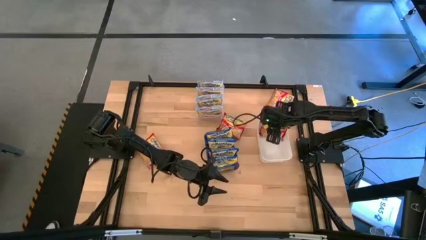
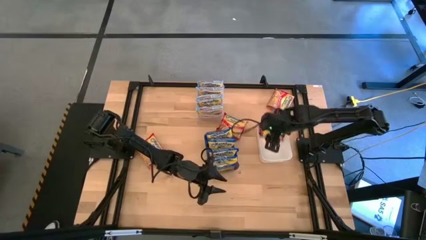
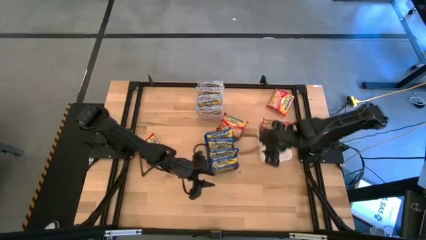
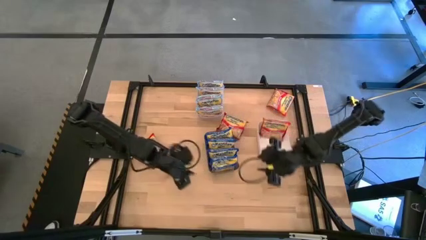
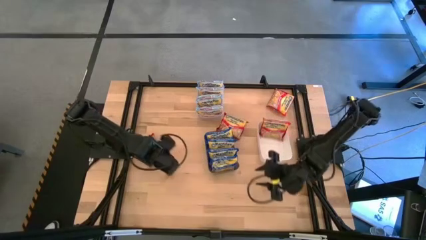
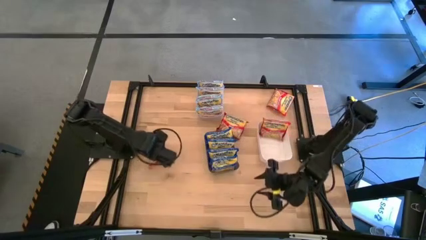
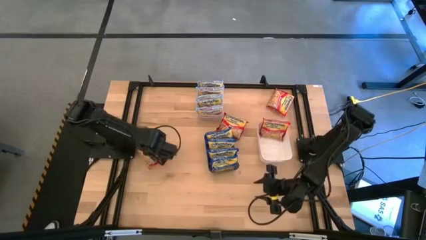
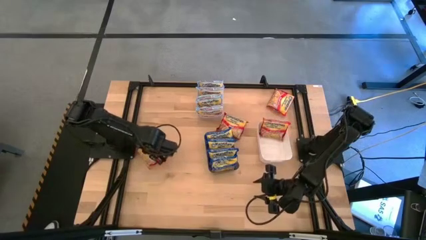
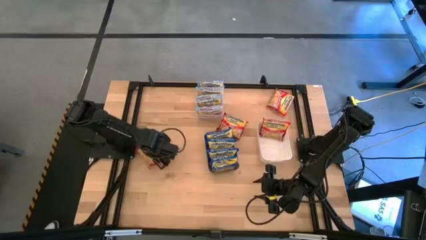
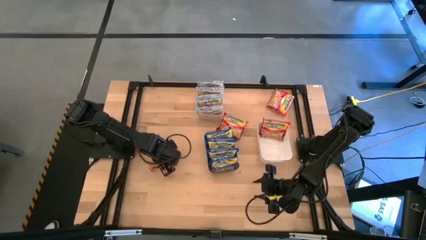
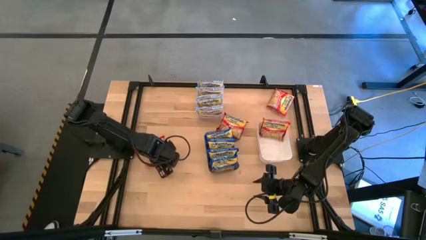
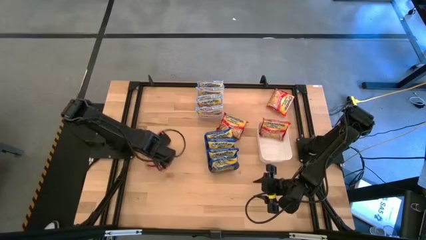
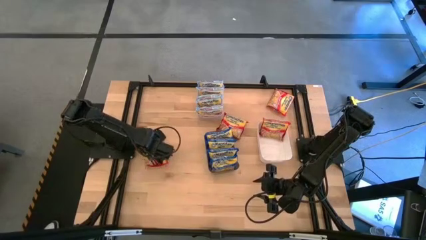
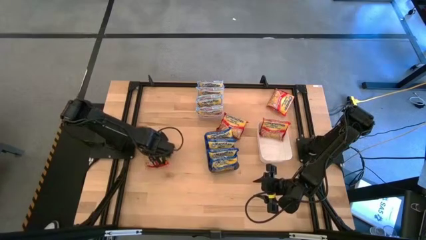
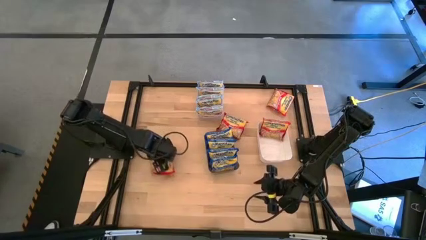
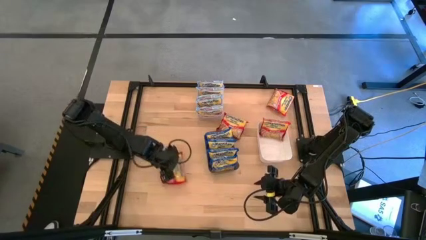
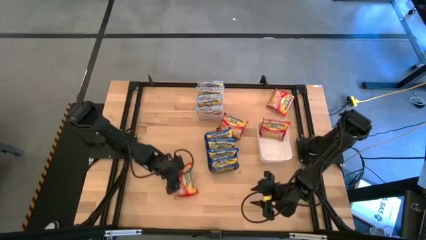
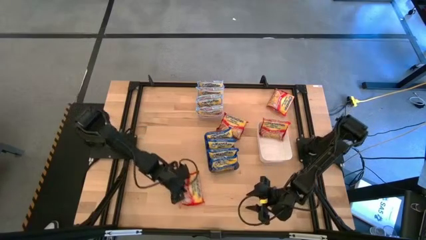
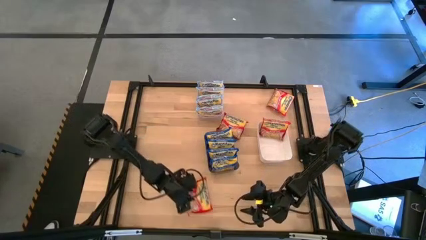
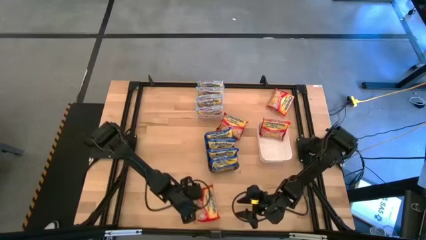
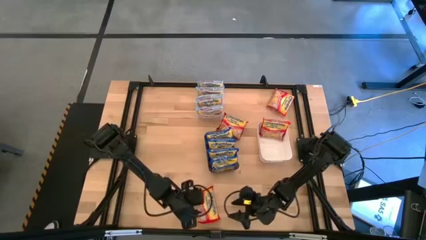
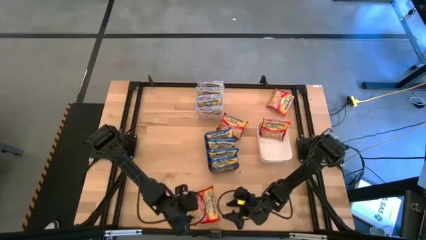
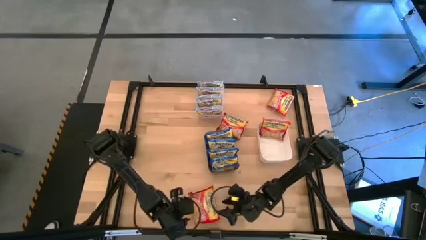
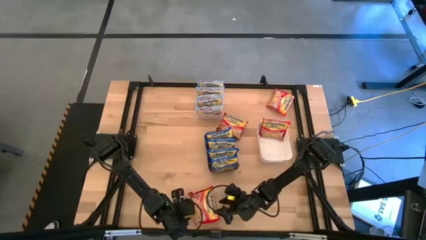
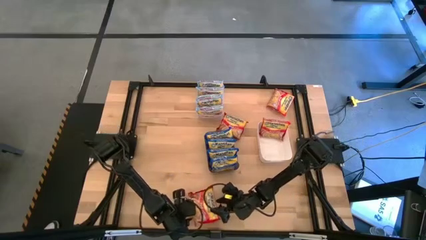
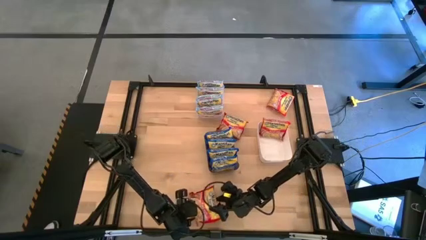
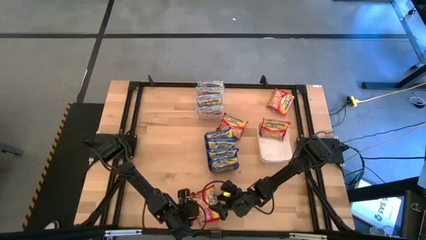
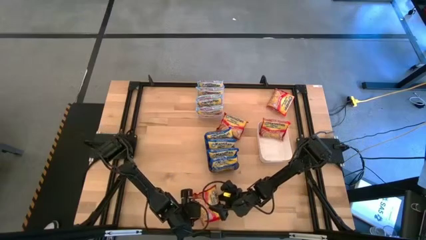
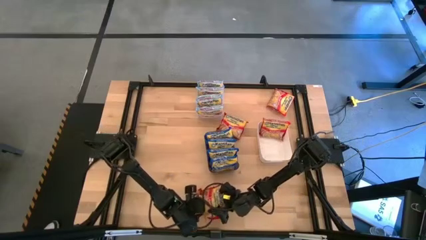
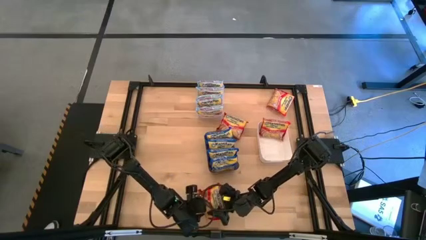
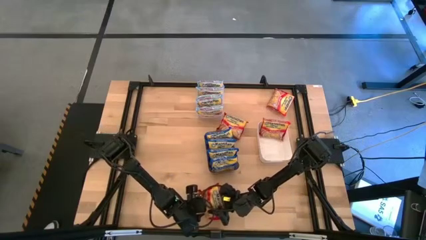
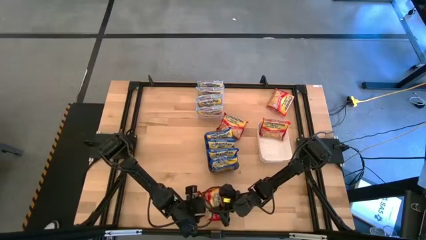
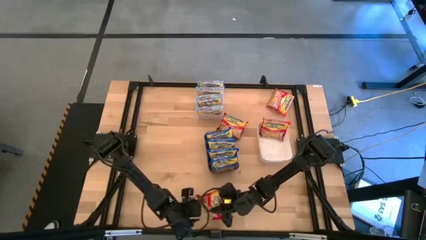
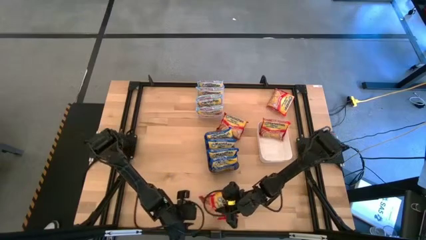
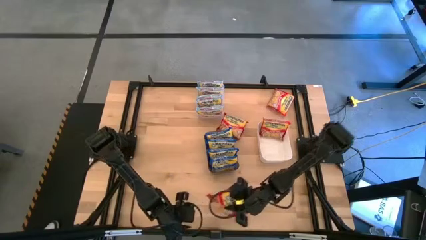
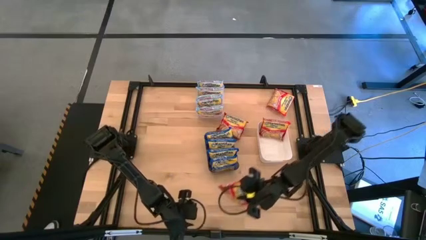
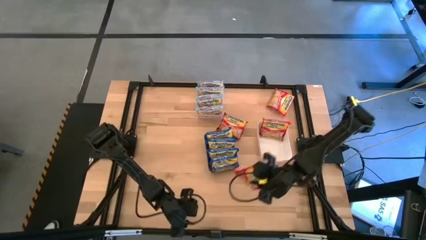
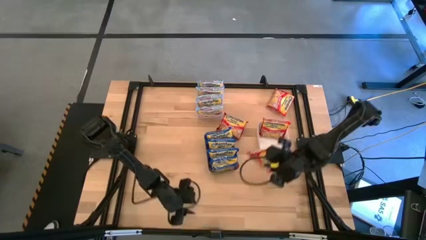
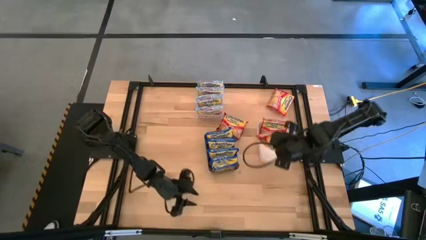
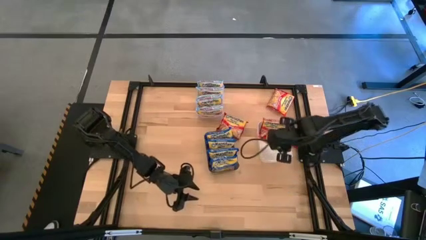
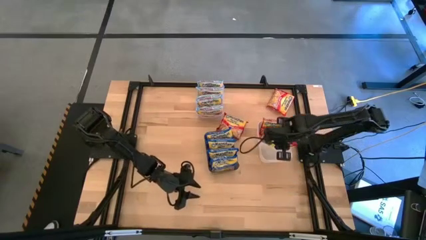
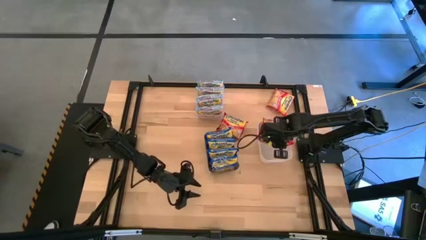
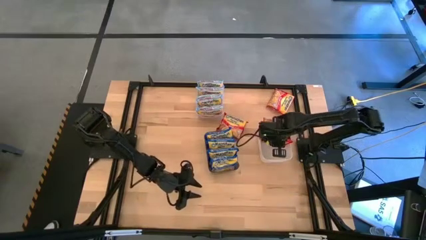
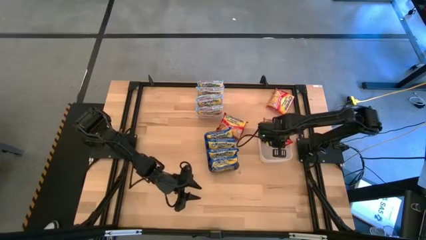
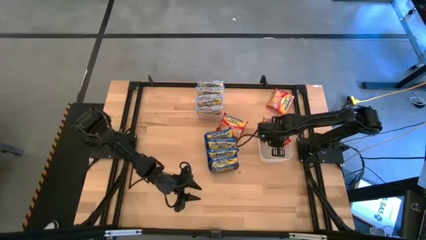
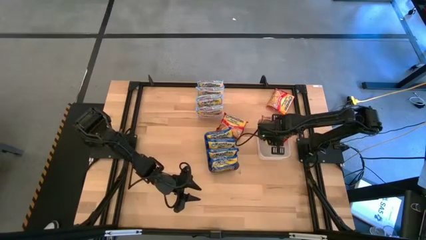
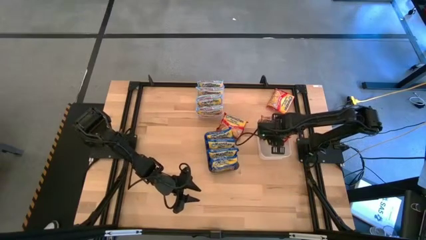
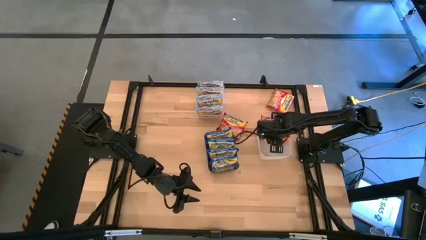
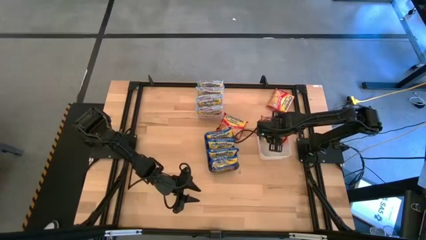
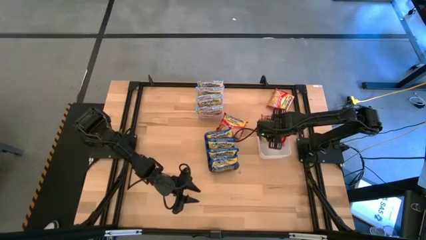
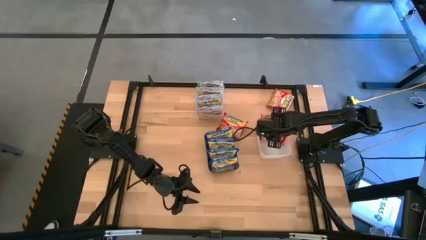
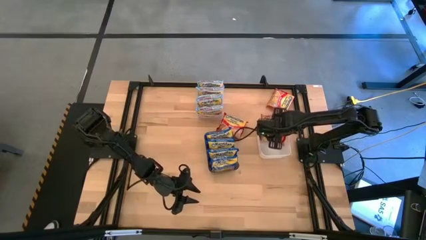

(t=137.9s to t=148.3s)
Task: Sort Maruchan noodles
Put the bottom left red noodle pack into the white bin

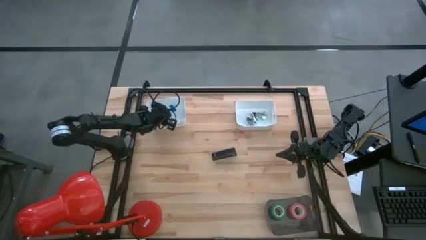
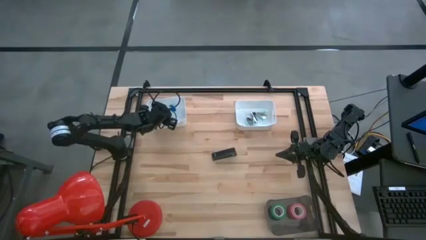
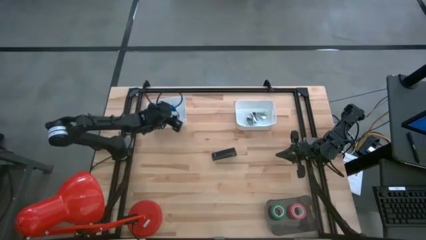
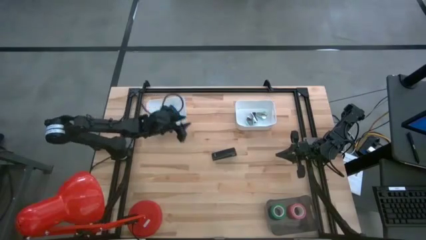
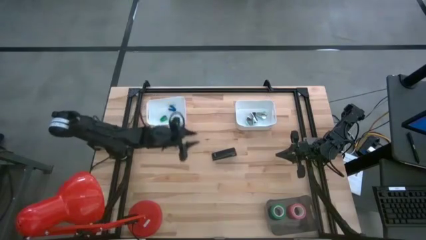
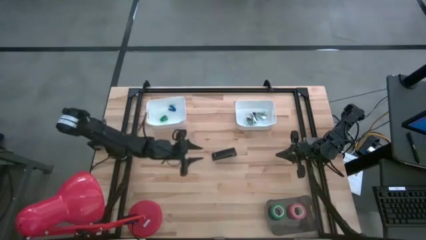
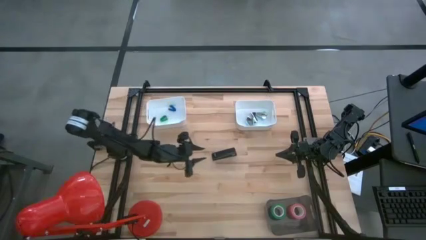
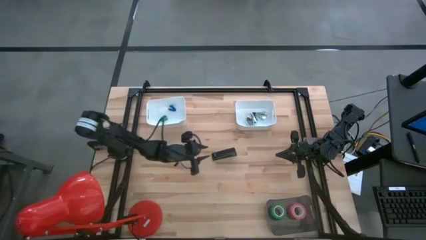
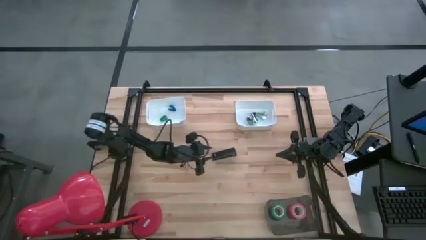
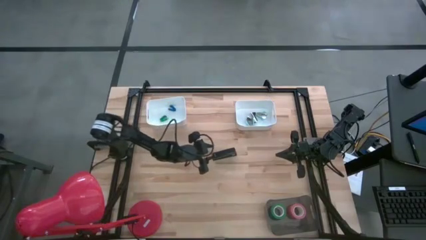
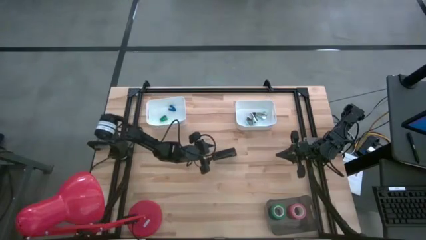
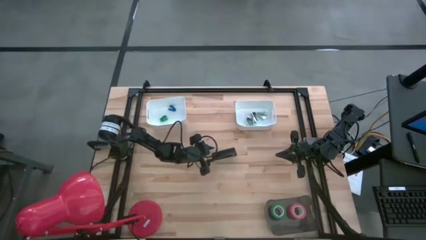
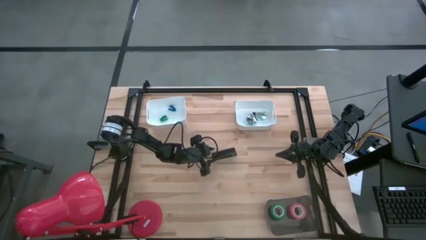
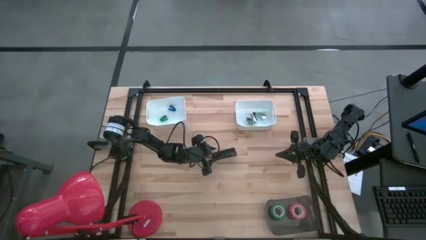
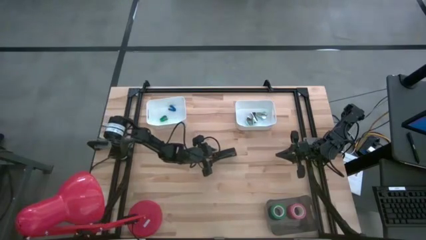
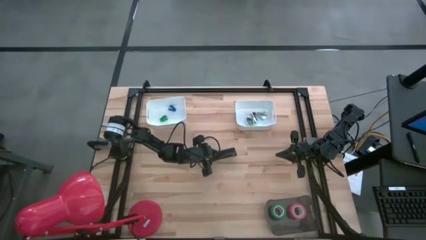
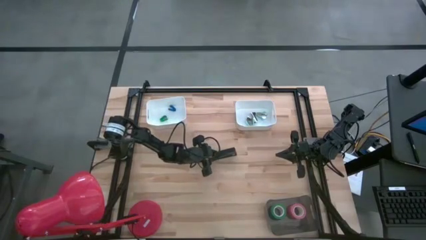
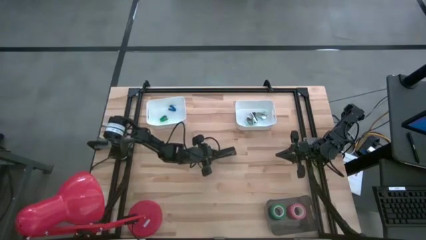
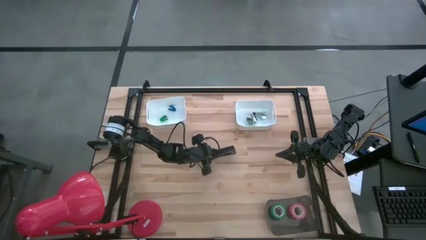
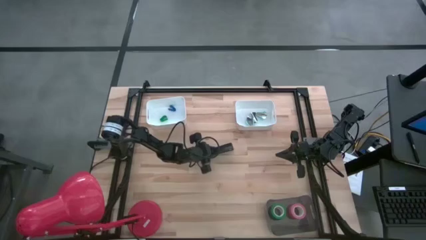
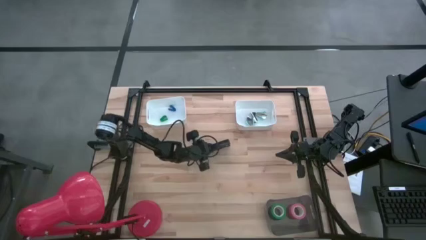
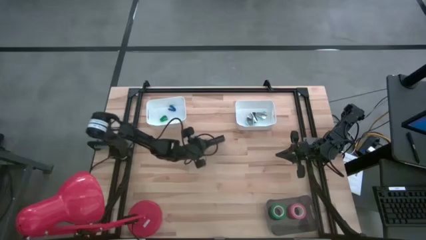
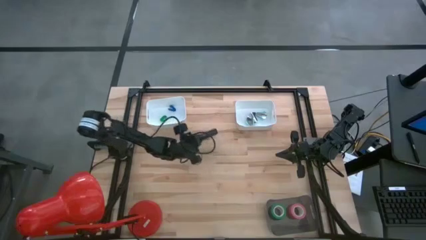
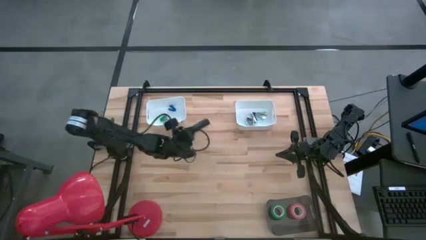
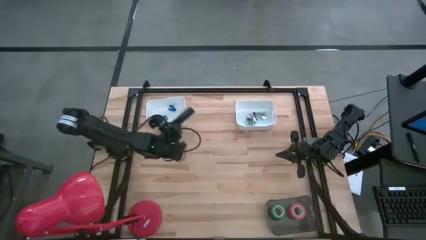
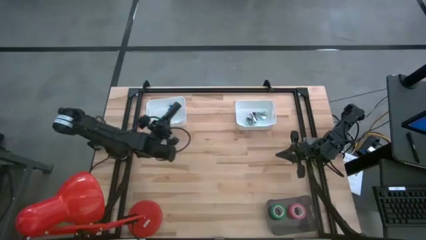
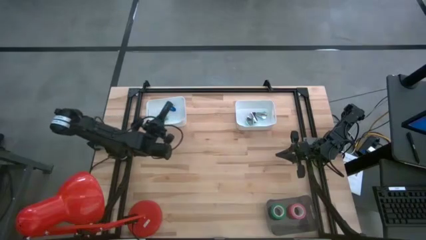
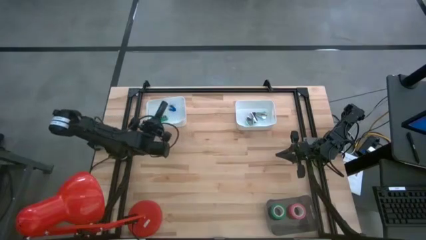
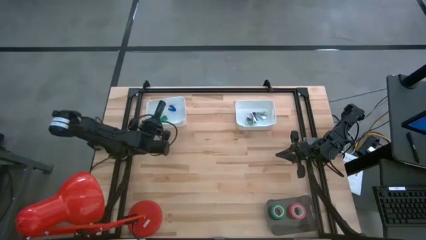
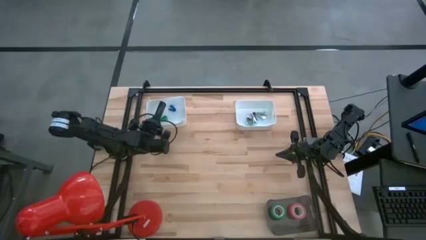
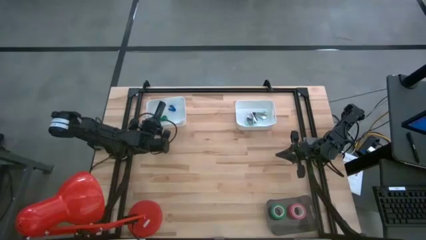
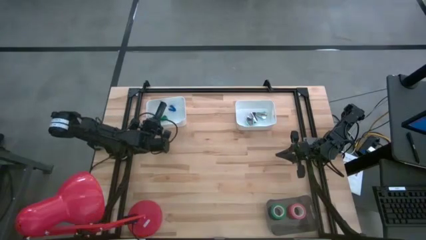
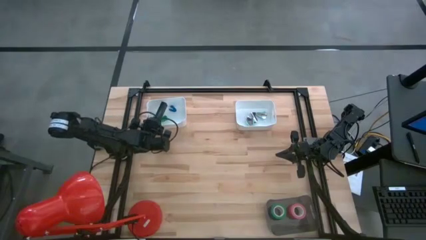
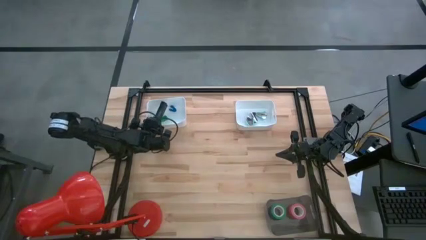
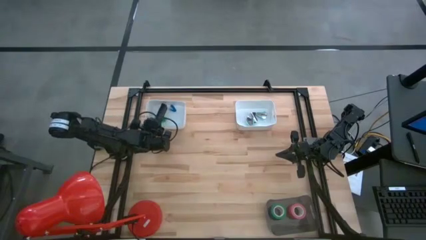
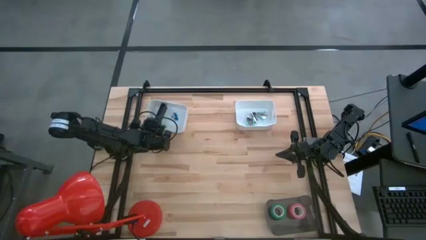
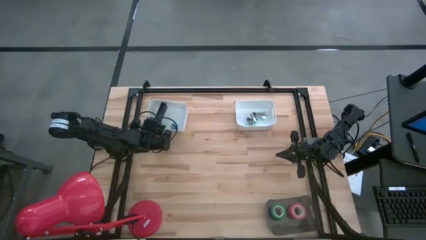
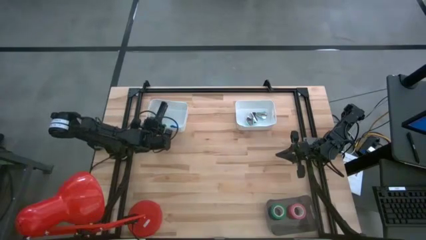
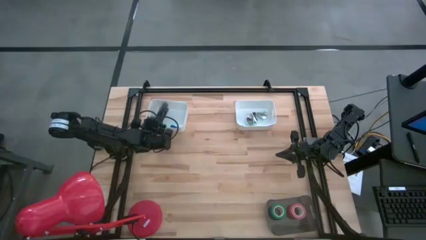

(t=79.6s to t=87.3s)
Task: Pick and place Stapler, Stapler remover, tape
Put the black stapler into the left white bin
